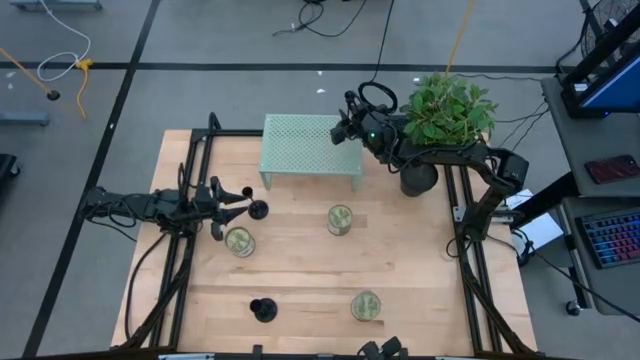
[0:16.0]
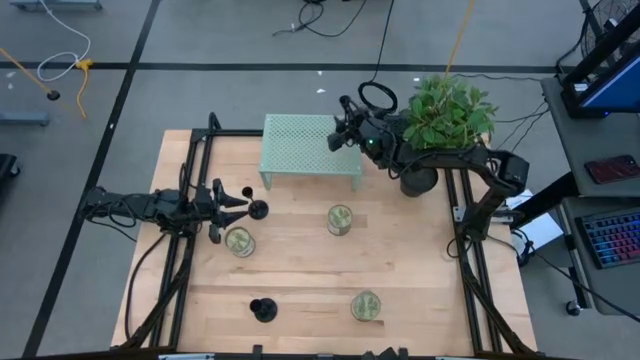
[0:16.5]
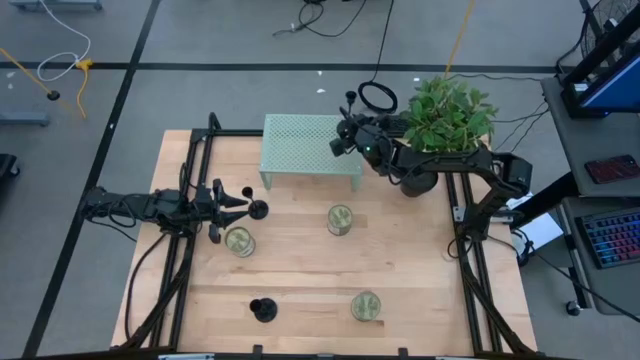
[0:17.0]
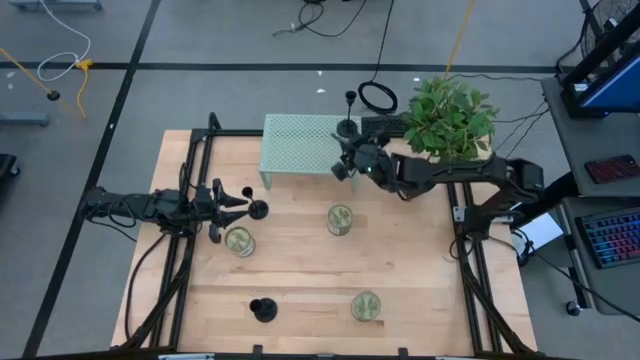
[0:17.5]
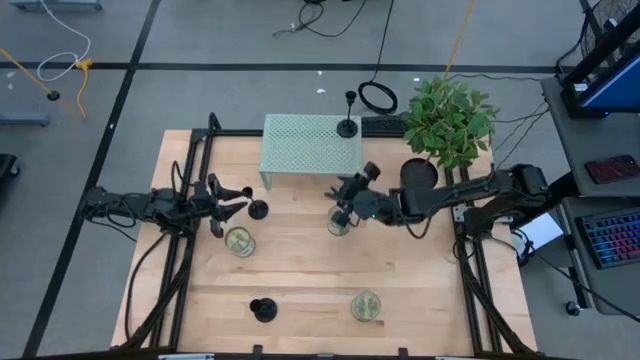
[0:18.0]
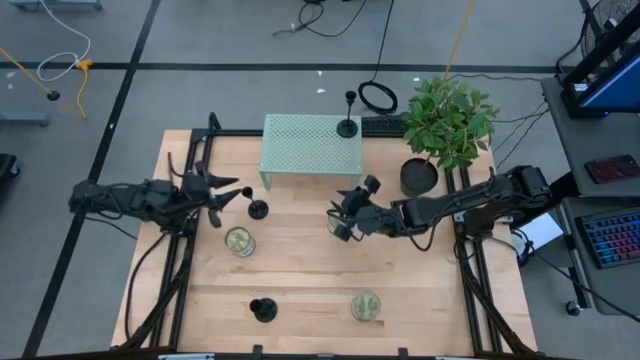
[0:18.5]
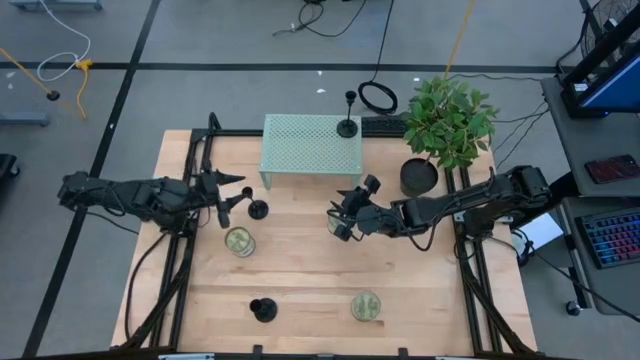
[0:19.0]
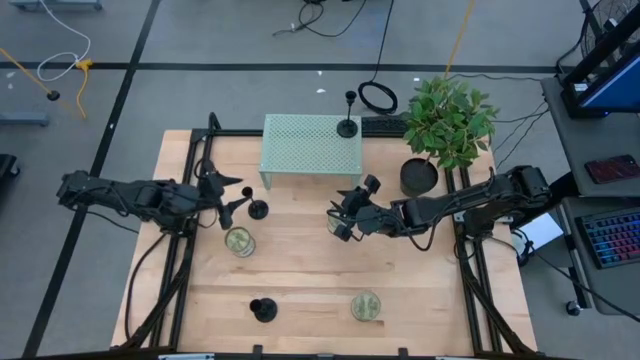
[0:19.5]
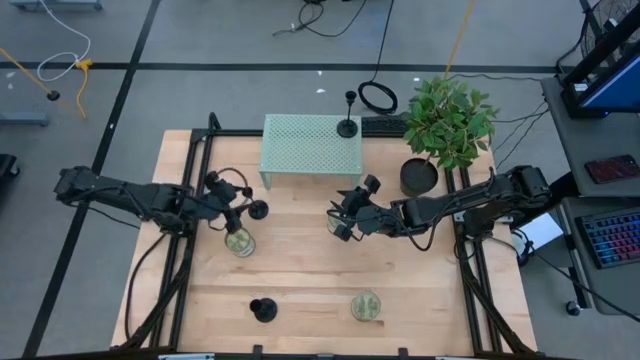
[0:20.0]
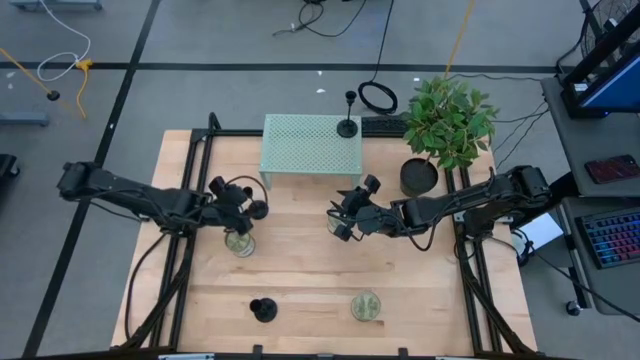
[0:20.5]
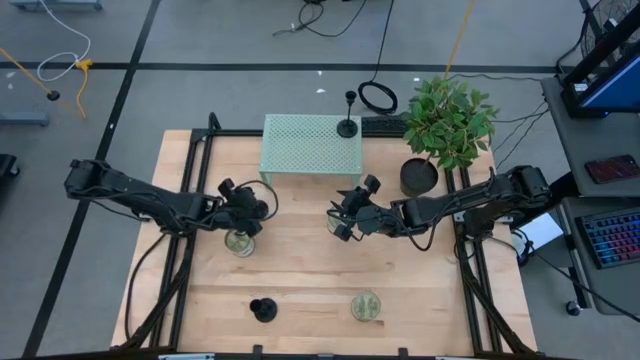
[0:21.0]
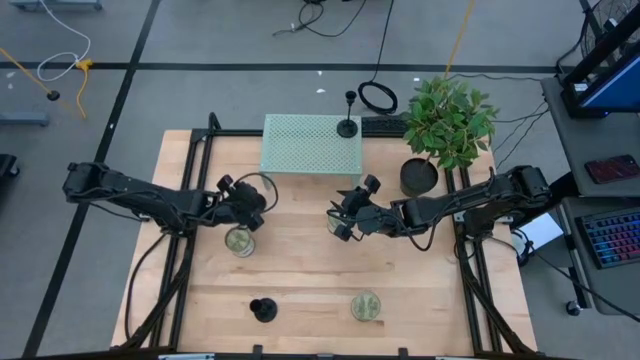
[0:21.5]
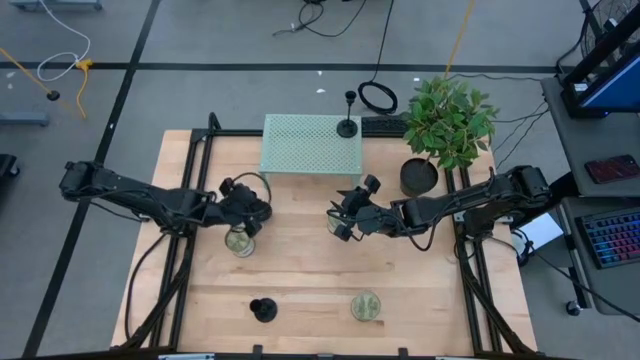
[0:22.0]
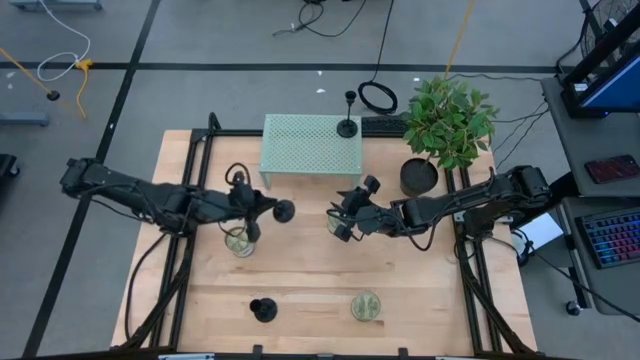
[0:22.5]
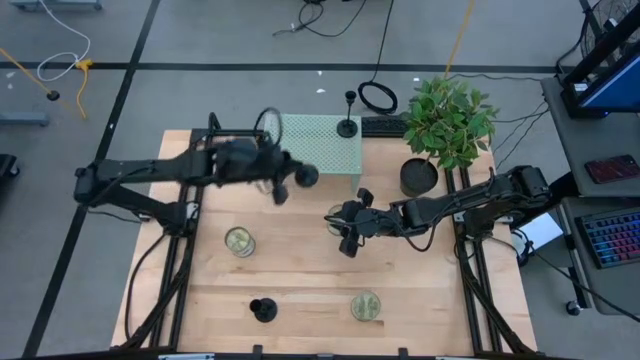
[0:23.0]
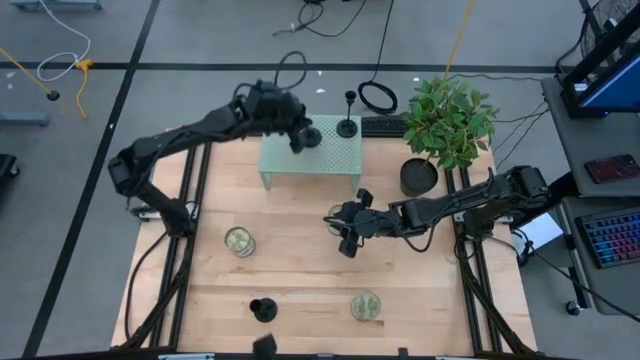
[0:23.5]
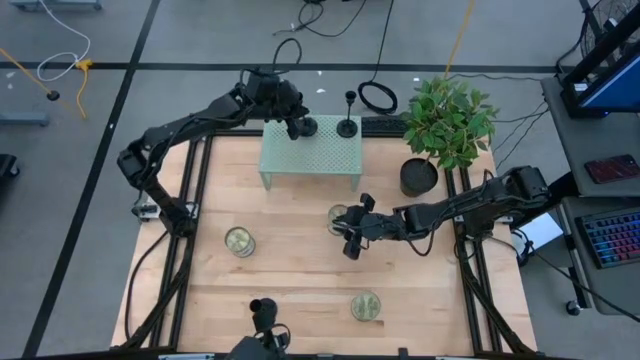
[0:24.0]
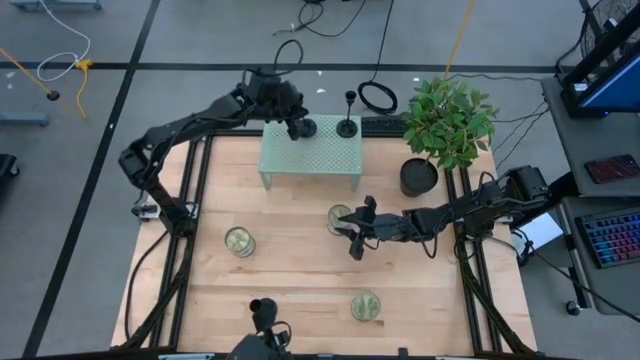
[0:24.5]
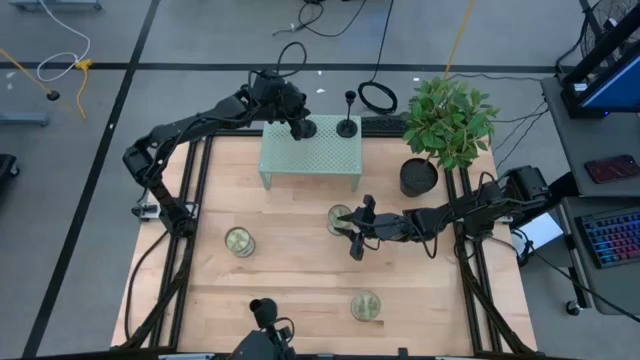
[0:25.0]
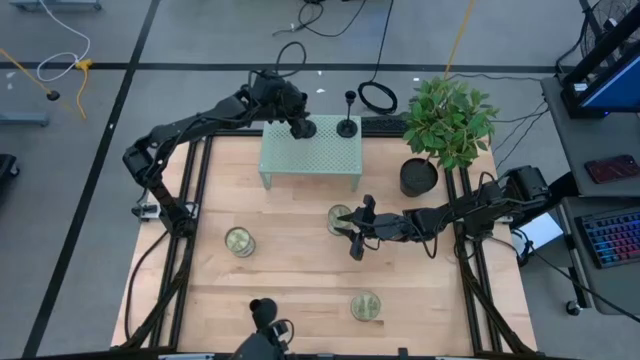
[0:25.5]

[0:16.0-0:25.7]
Task: Pick & Place candle stick holders
Put the top black candle holder on the shelf

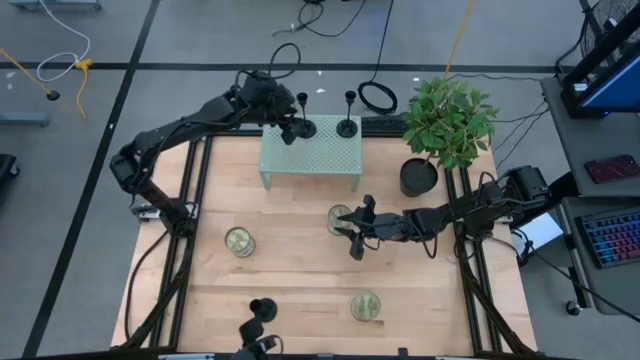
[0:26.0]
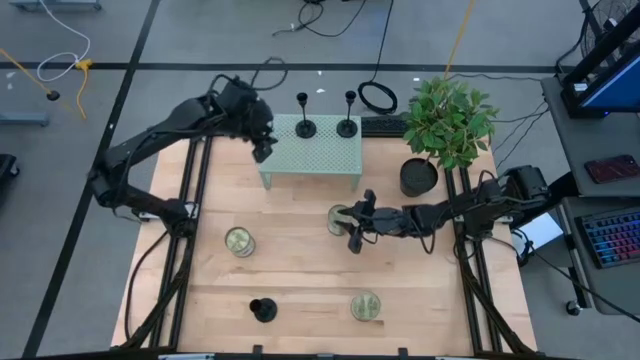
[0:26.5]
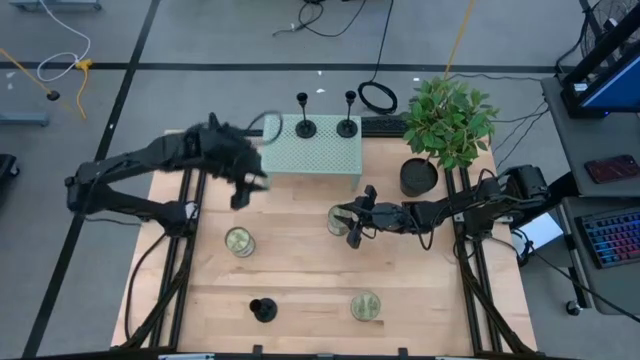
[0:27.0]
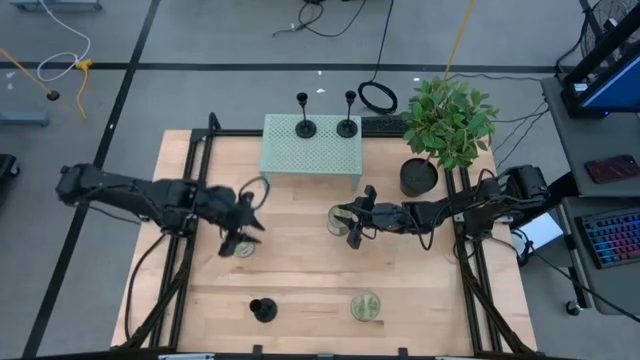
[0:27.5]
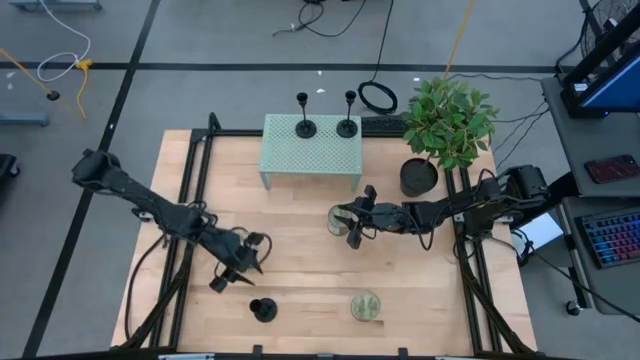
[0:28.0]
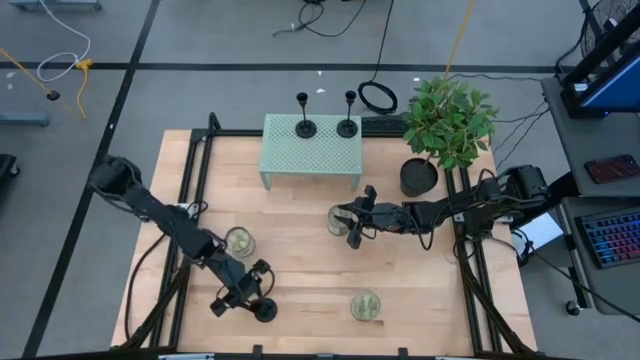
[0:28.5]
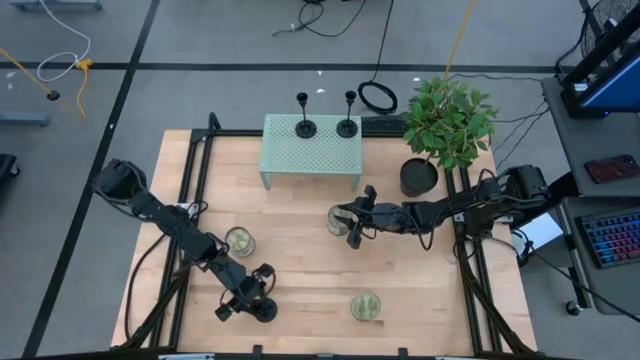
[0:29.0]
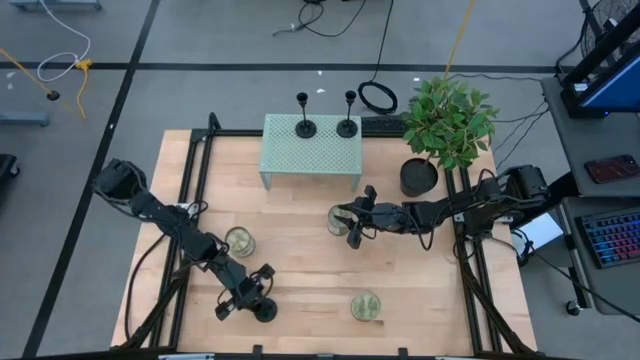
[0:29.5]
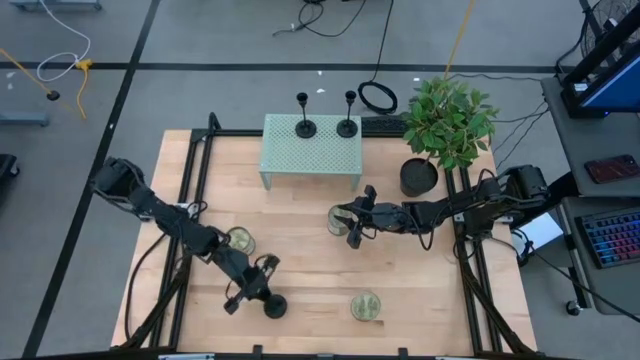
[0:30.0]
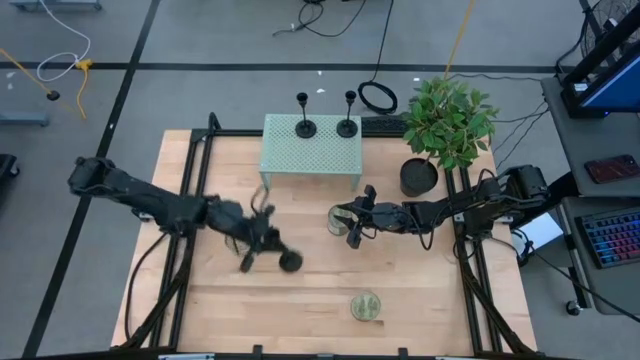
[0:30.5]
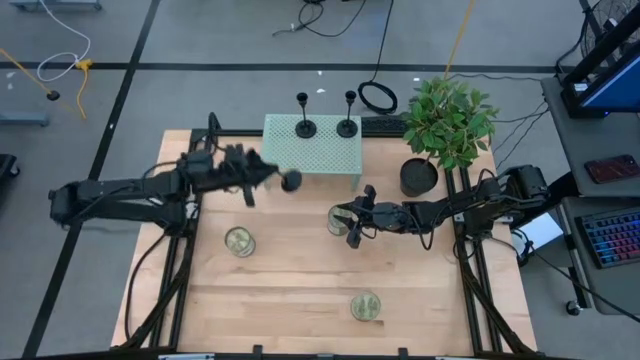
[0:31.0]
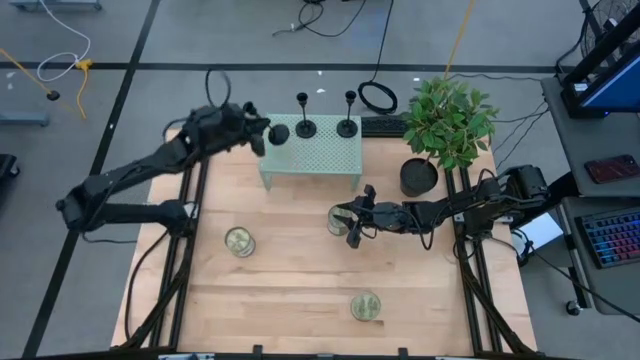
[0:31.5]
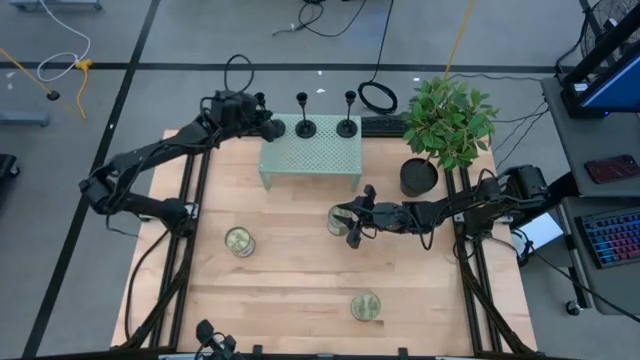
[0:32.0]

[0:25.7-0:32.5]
Put the black candle holder on the shelf

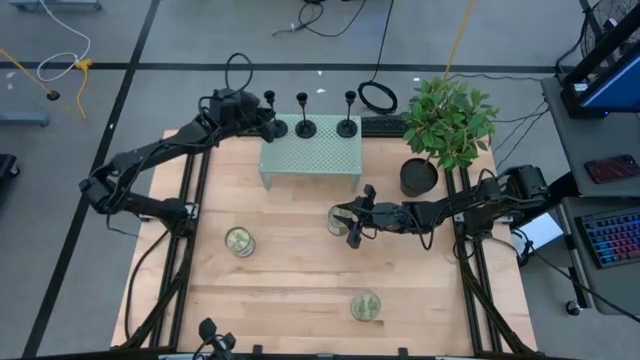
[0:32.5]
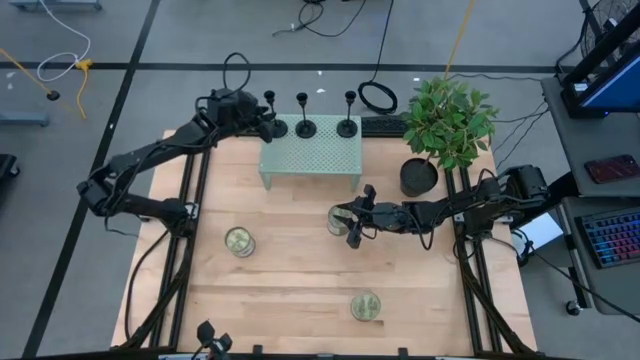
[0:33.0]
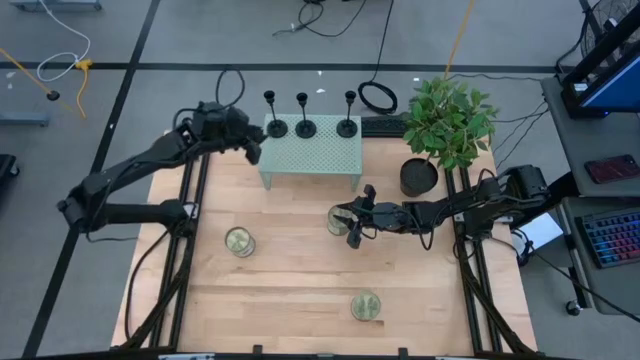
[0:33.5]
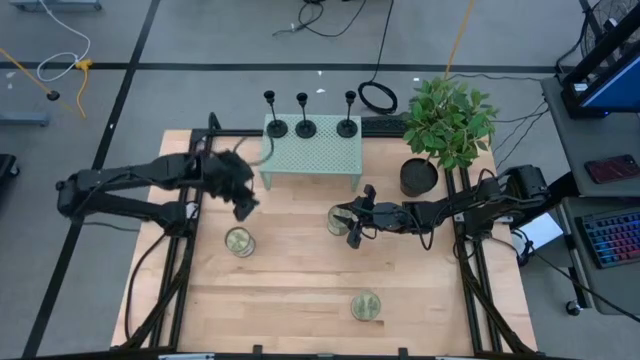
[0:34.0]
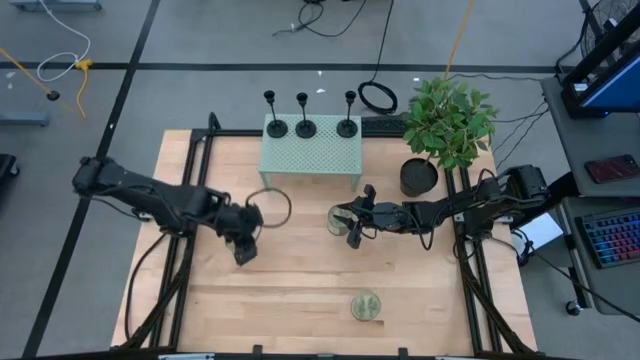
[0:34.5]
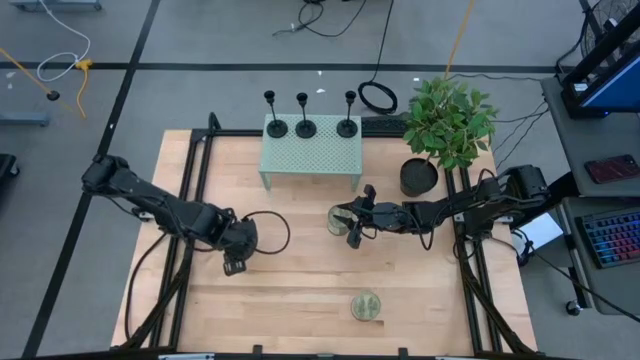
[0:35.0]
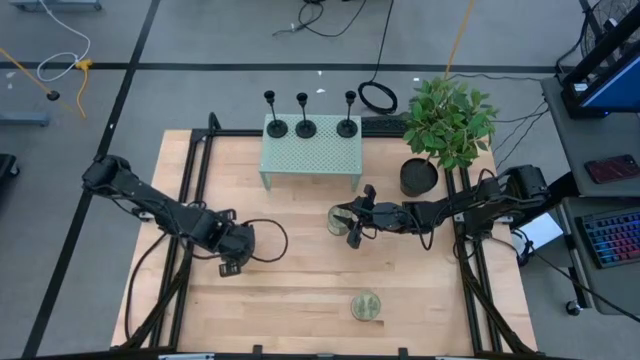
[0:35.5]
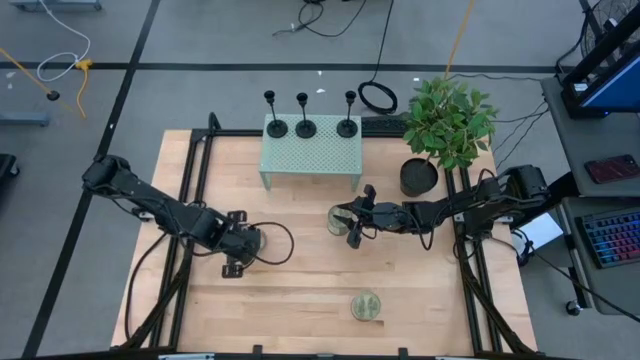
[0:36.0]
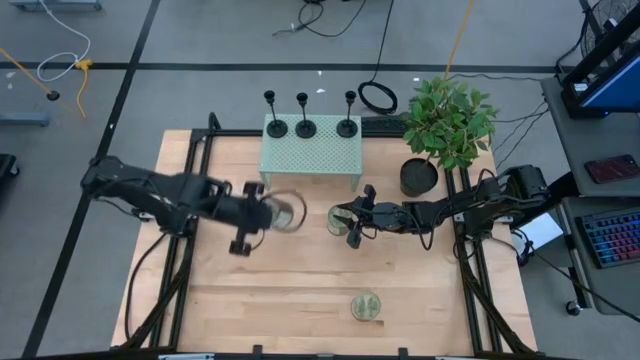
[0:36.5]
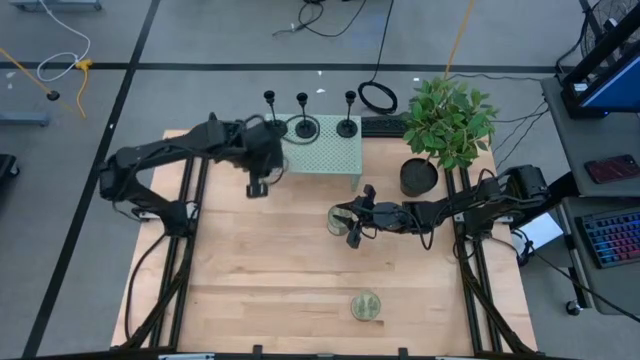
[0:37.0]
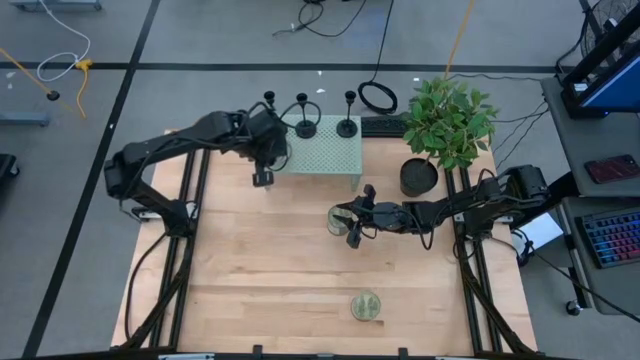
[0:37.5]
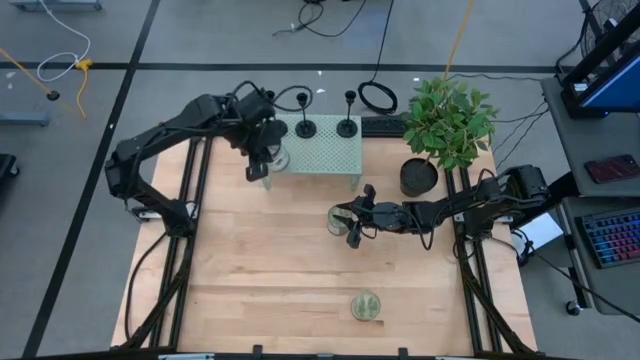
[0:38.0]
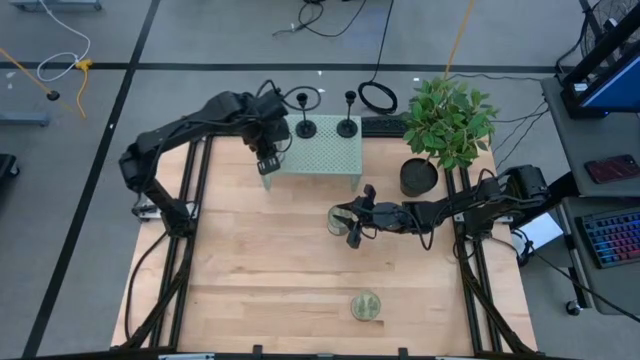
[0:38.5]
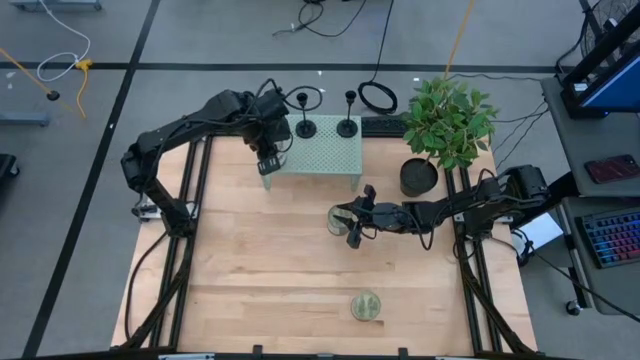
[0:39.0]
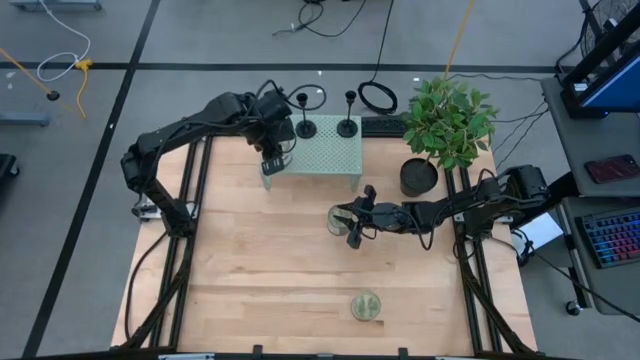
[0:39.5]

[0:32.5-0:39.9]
Put the middle green scented candle on the shelf
